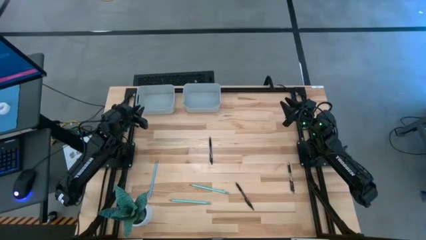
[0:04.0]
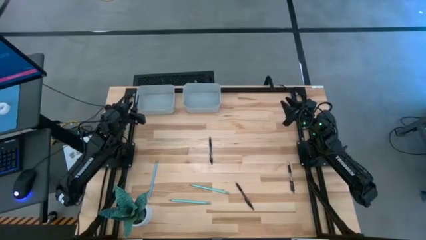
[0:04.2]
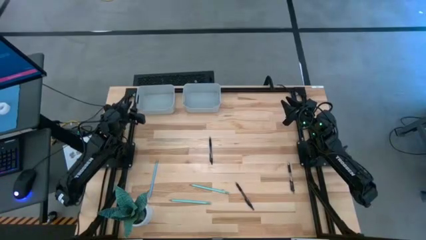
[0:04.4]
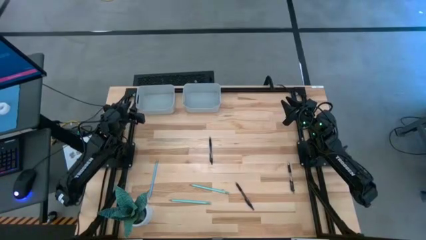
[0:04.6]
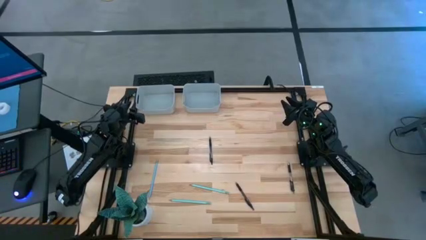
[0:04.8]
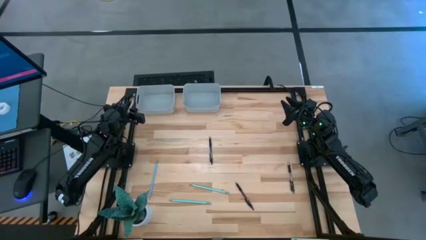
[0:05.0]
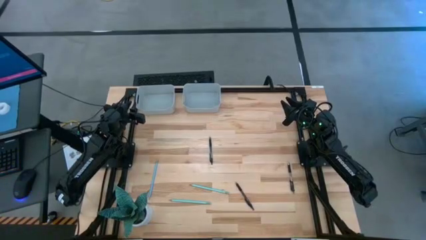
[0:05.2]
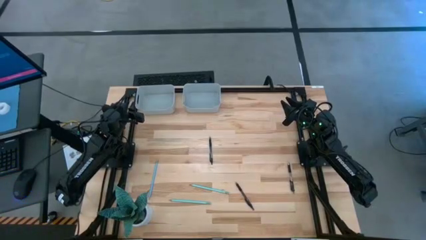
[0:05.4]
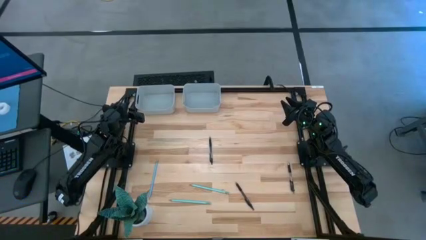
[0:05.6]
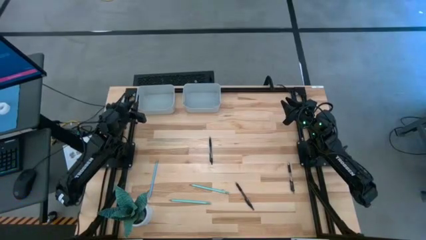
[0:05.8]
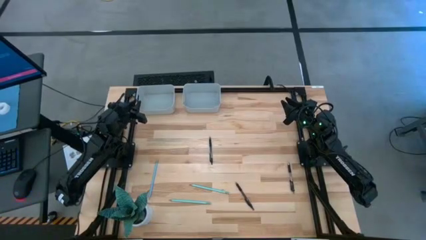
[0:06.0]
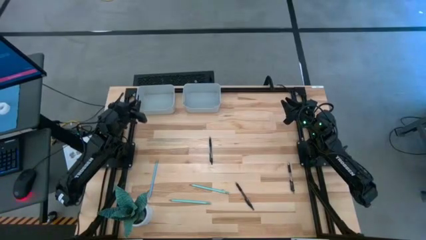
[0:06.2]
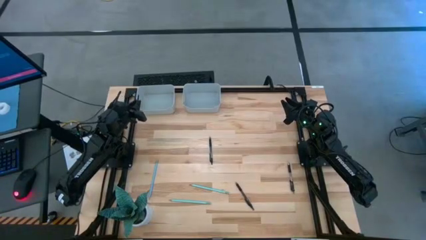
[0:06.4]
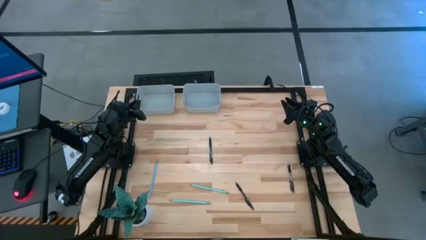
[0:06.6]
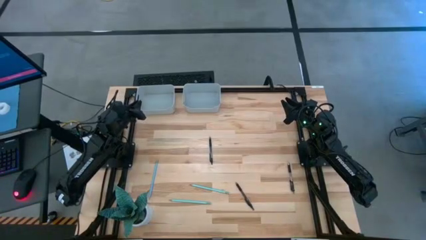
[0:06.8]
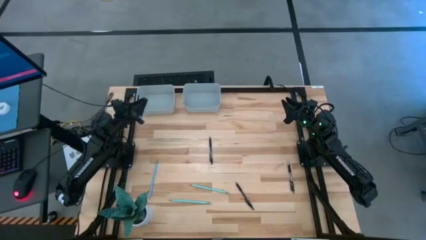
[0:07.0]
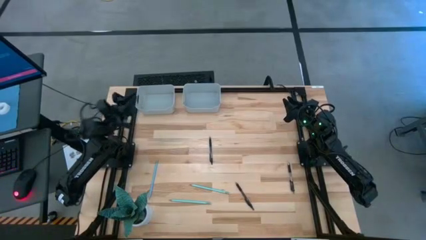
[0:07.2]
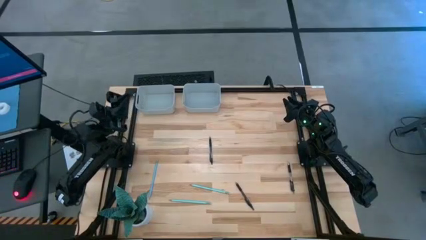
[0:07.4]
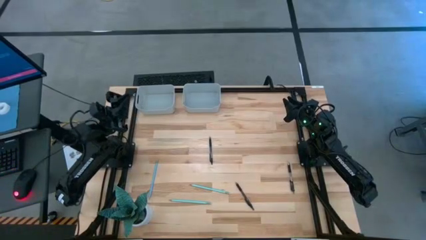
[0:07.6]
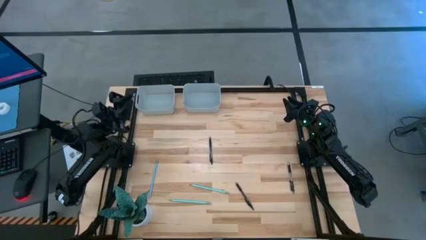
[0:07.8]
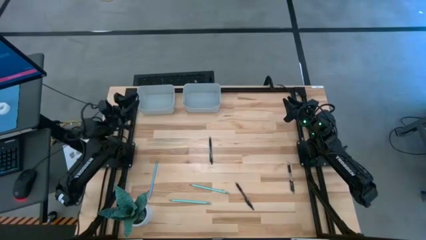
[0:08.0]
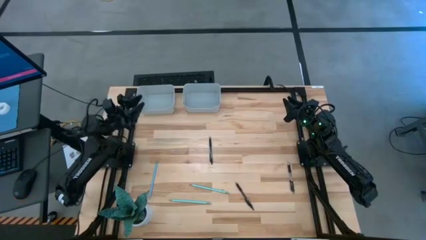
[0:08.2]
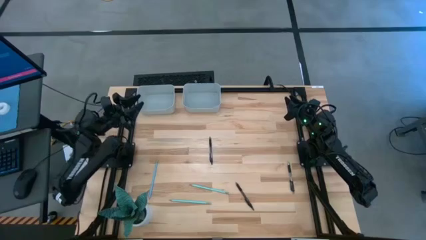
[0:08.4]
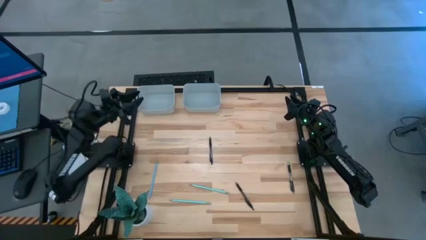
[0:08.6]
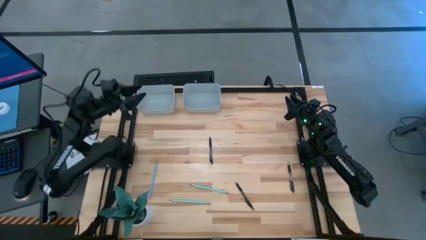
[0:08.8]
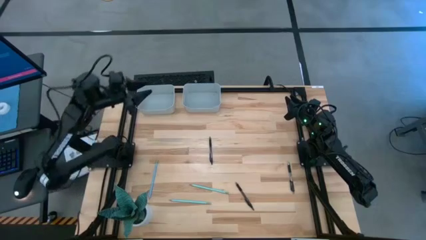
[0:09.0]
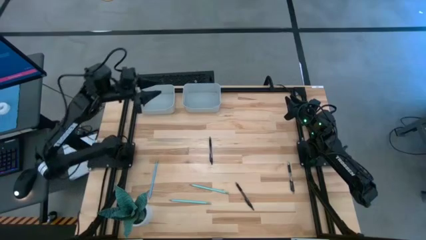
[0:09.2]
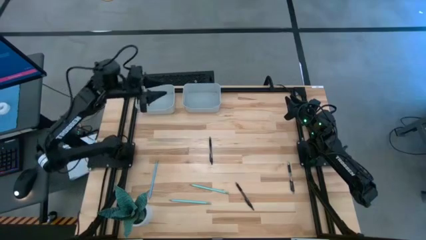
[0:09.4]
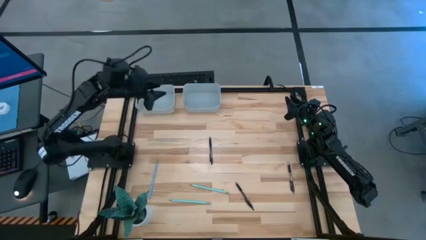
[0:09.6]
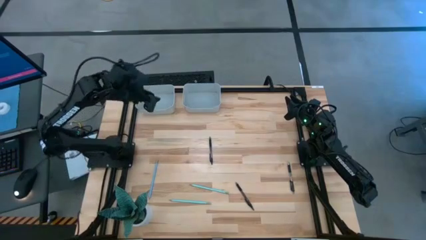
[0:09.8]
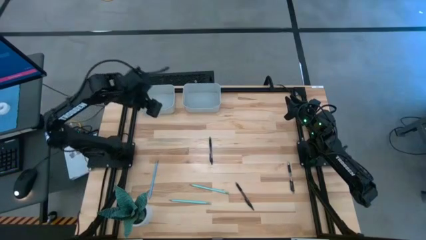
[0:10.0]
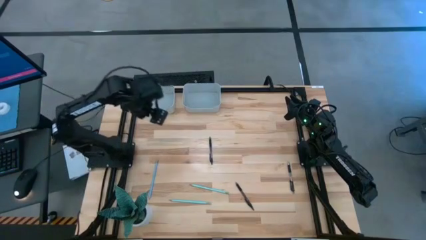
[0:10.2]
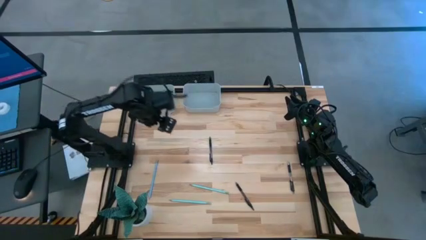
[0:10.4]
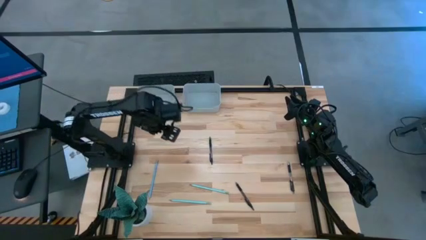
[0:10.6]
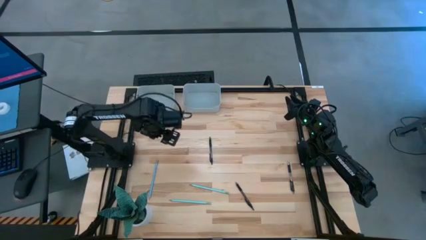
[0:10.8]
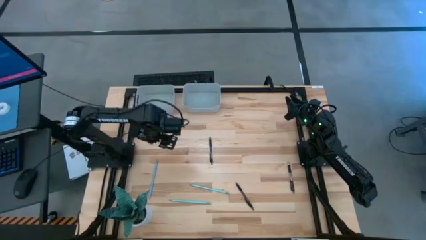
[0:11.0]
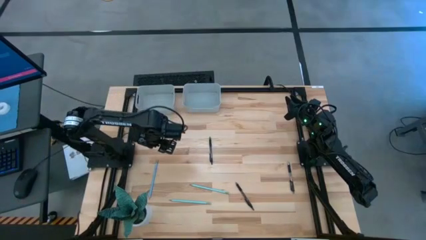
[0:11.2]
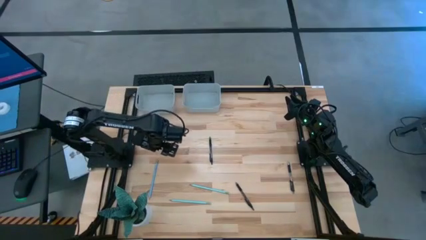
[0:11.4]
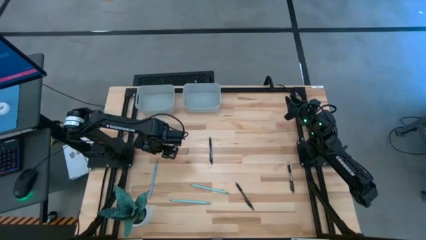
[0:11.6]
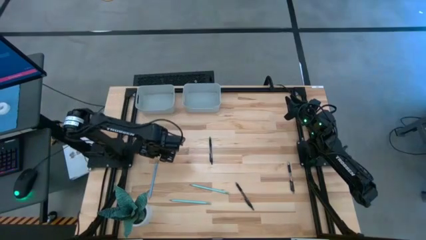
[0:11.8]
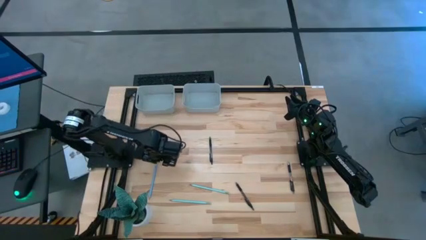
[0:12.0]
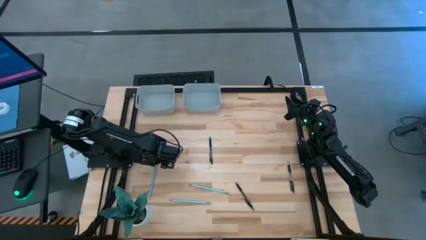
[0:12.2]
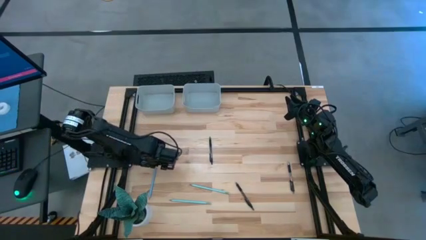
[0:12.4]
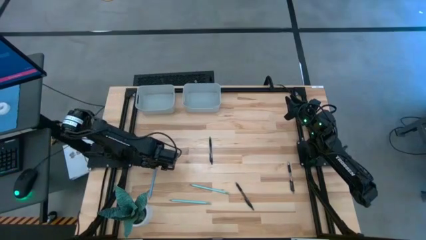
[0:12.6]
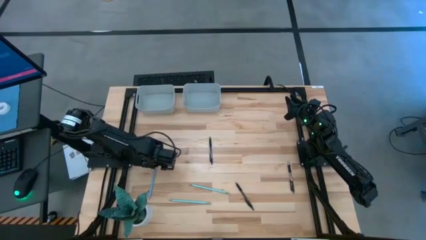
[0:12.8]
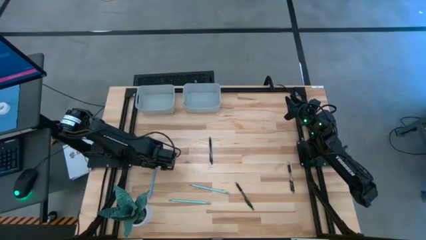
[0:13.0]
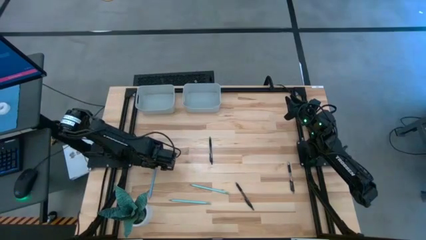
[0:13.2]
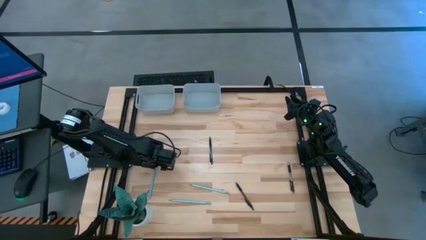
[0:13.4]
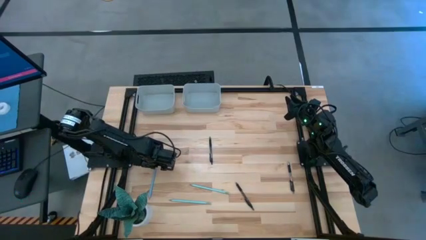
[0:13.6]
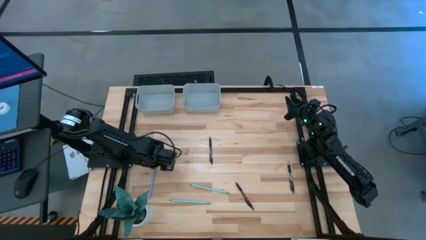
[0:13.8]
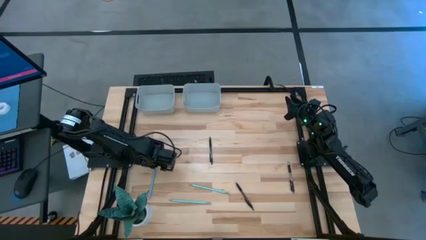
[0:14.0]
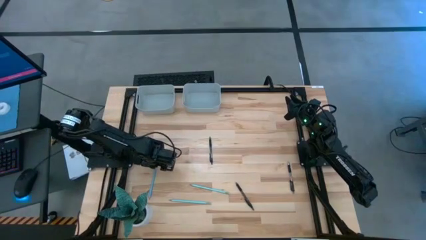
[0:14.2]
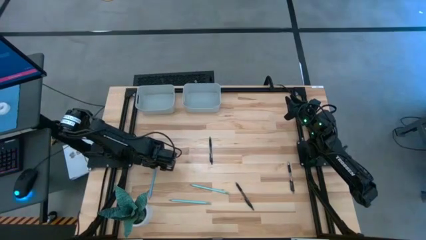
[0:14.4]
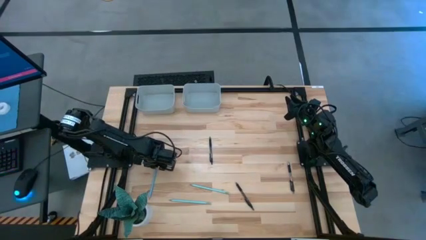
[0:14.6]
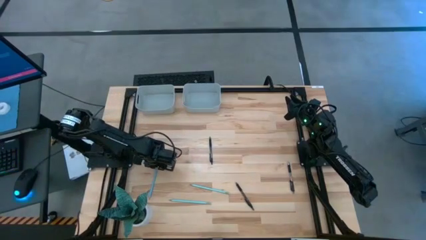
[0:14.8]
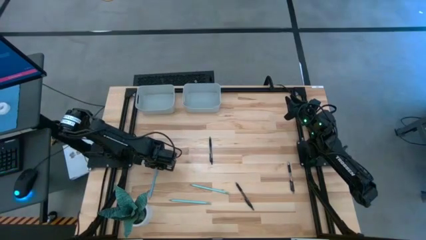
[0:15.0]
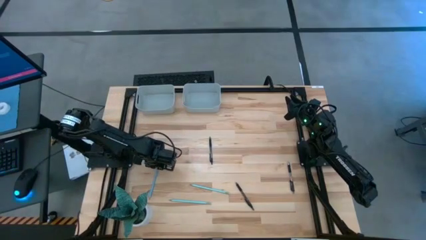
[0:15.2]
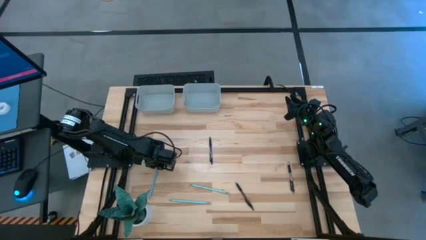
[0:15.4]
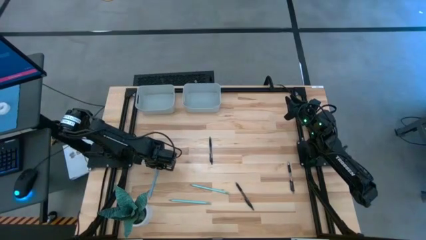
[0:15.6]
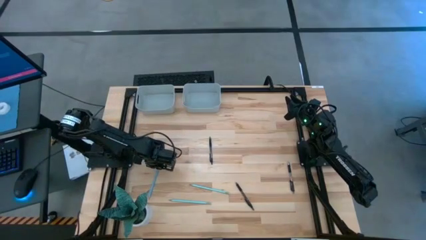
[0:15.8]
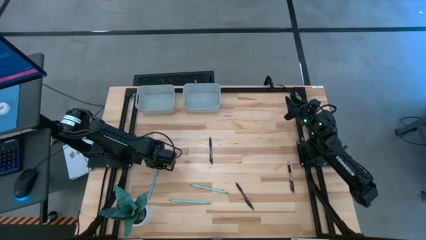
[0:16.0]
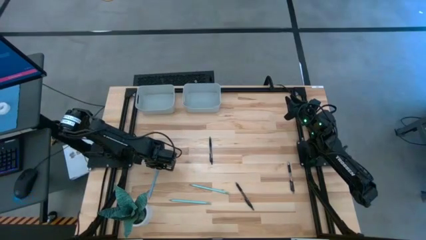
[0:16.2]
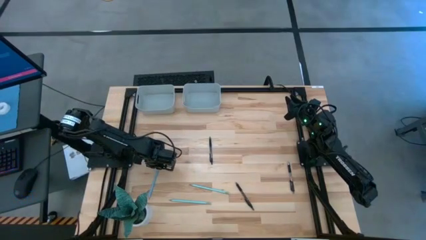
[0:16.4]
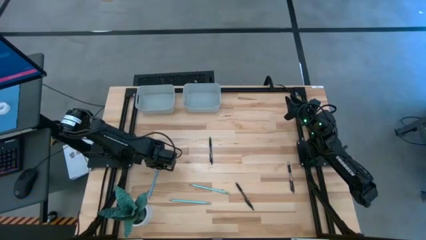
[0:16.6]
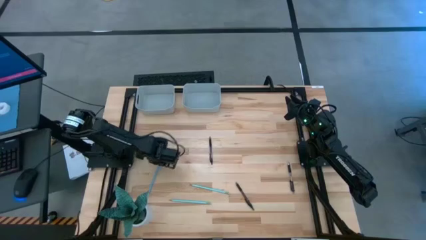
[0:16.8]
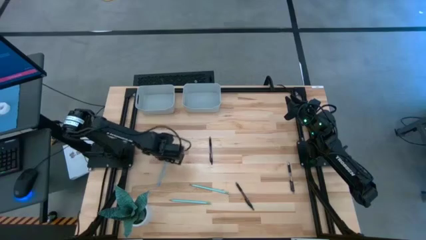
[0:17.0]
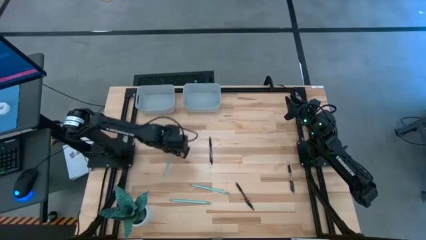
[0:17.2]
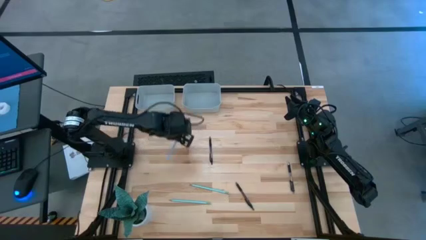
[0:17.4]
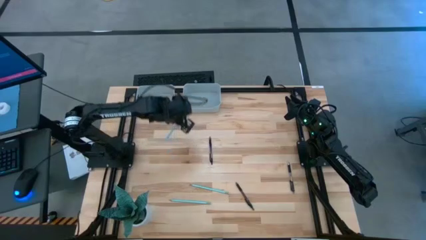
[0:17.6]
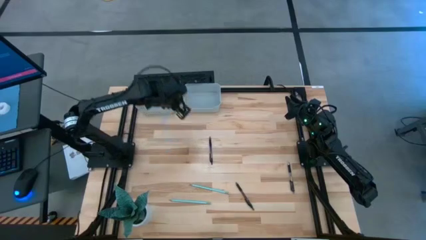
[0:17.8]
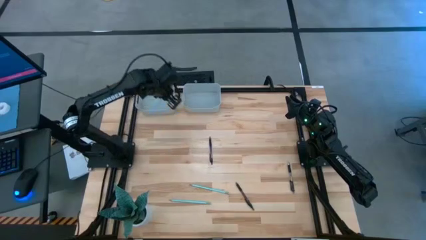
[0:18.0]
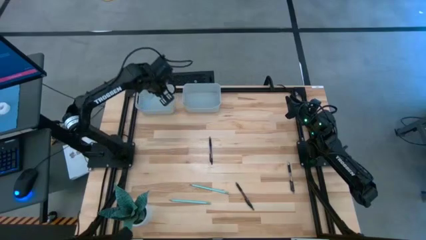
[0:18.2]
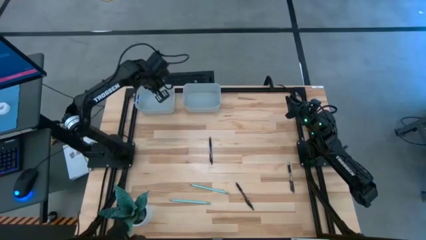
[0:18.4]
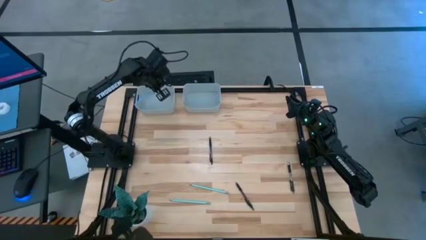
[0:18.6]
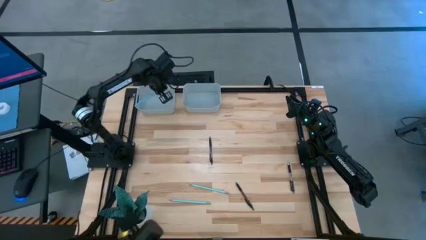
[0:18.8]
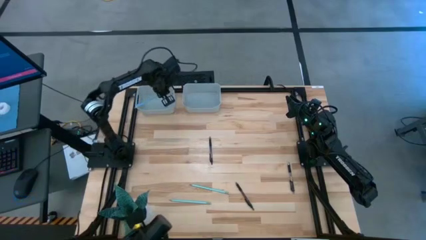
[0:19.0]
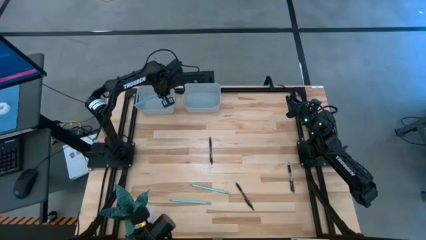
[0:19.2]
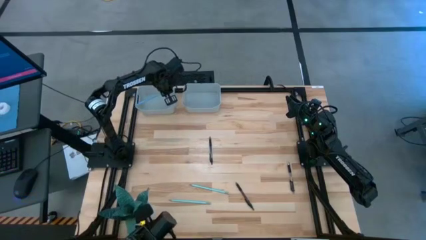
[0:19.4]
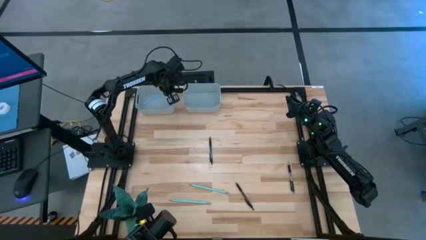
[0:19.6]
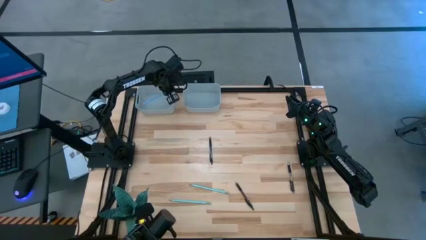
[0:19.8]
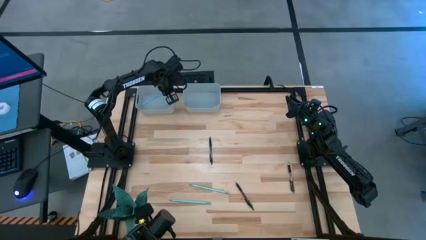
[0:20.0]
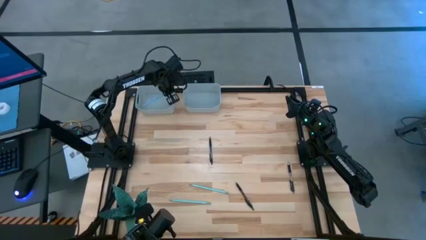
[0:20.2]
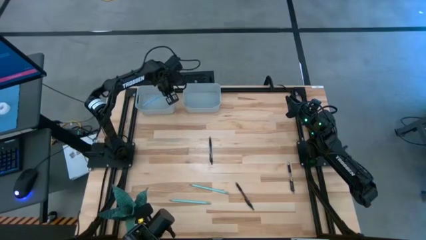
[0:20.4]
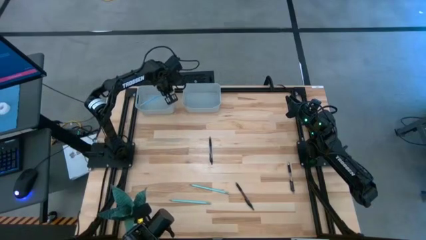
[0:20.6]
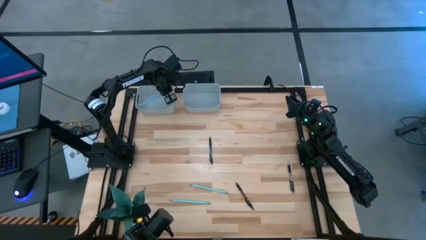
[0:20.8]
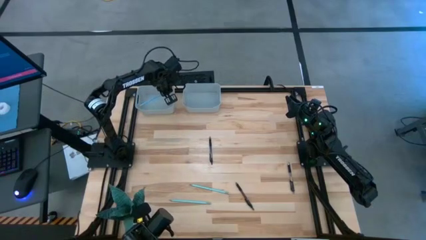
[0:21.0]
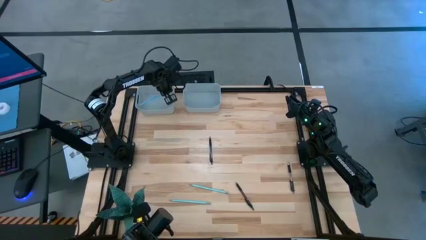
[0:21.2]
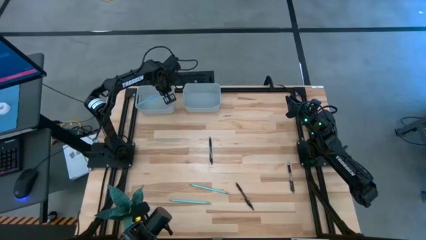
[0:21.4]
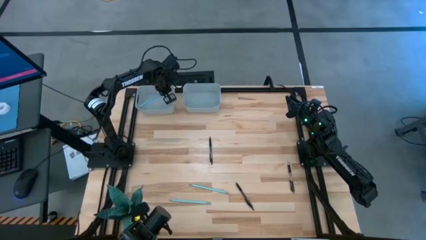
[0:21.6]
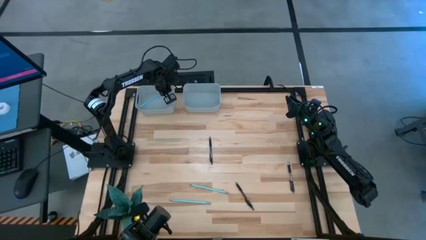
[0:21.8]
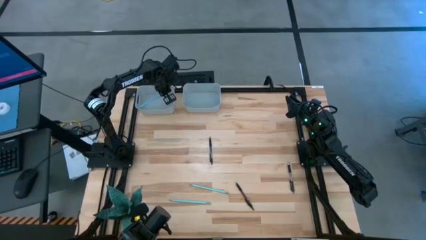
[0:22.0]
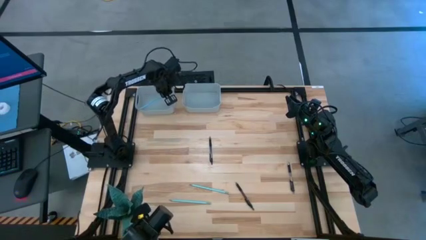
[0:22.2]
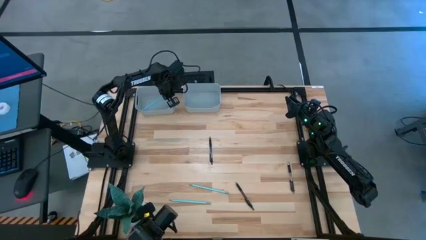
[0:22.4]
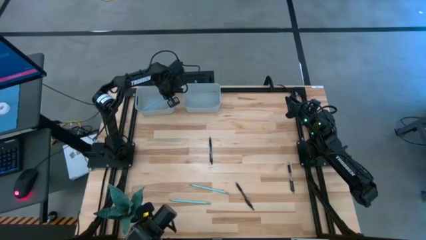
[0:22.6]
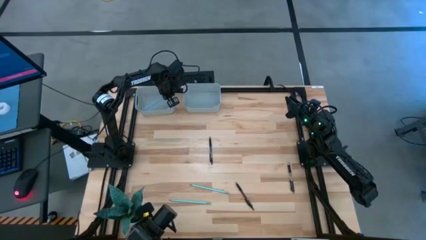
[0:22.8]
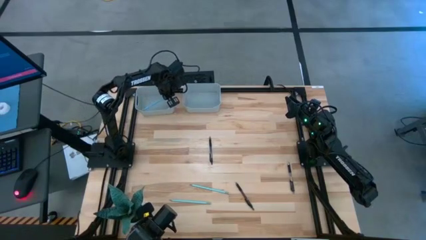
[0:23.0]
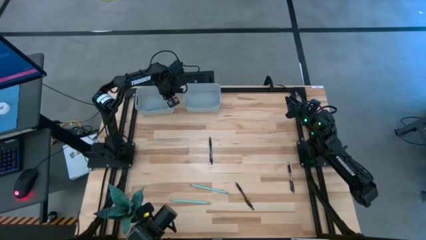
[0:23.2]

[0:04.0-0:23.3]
Task: Sort pens & pencils
Put the blue pencil into the left gray bin
